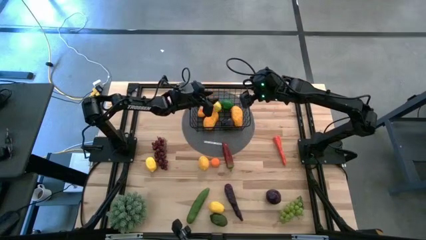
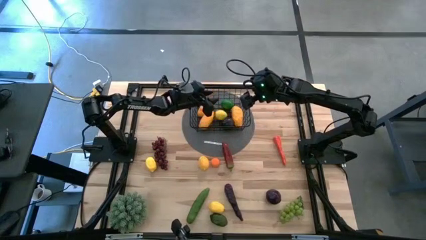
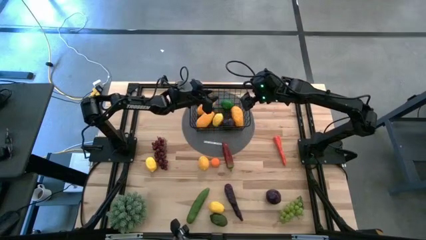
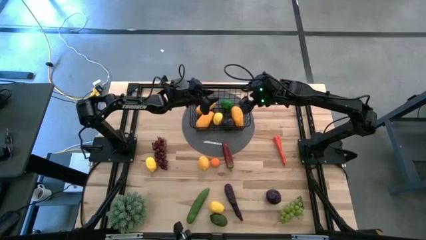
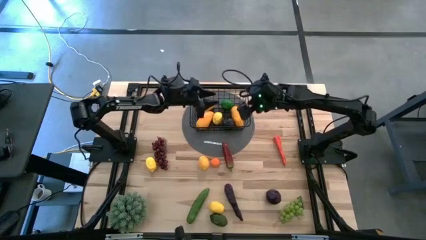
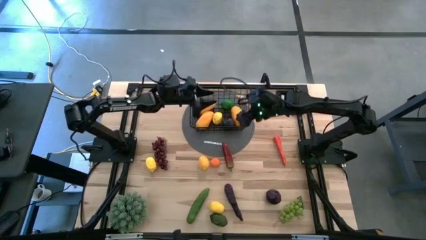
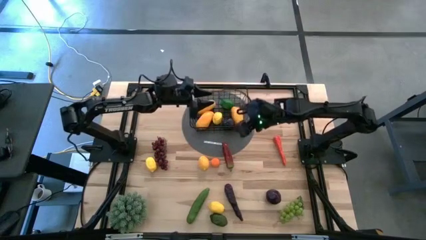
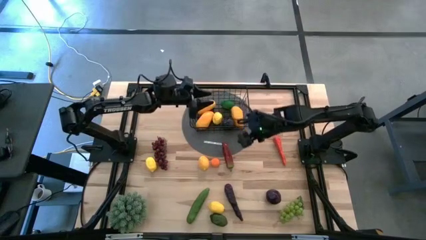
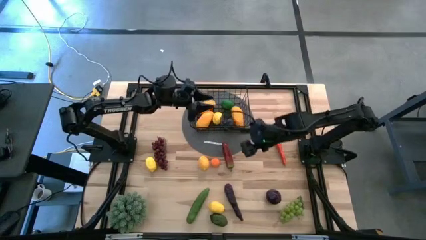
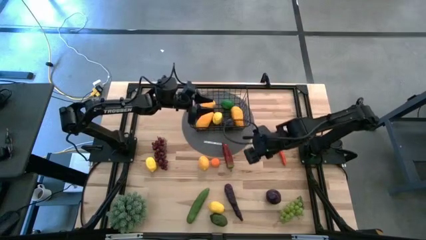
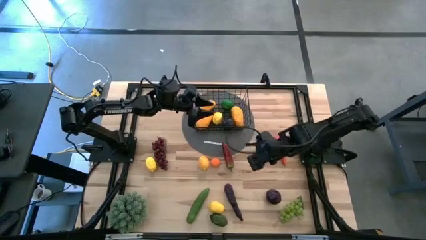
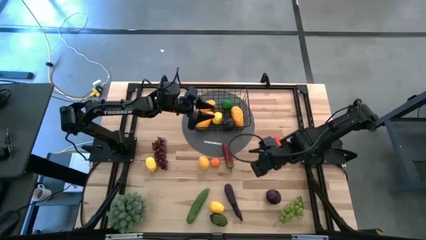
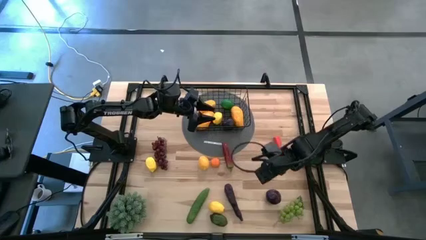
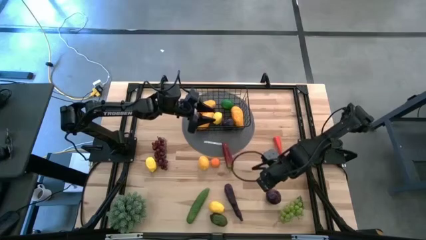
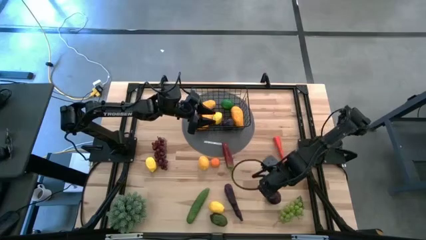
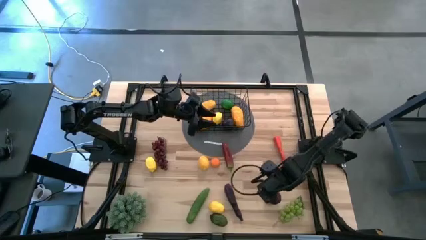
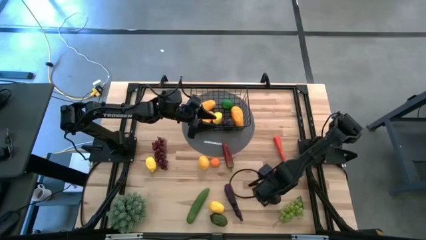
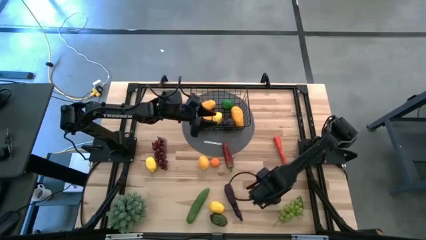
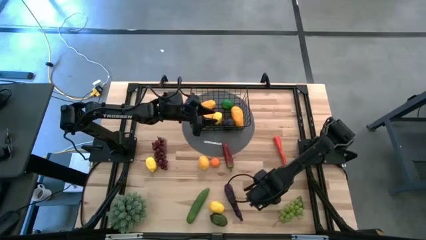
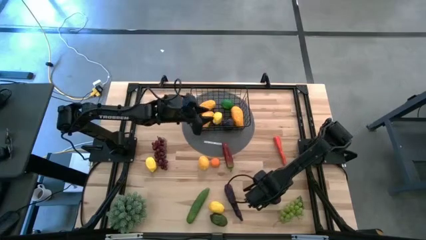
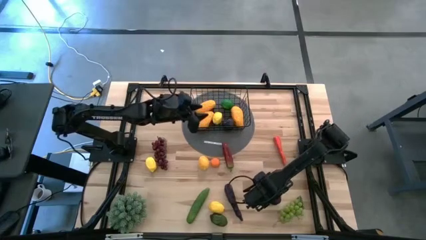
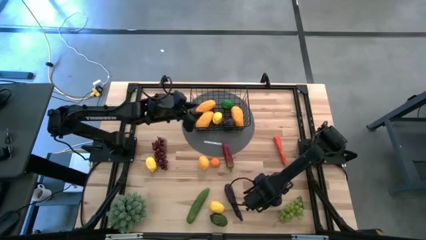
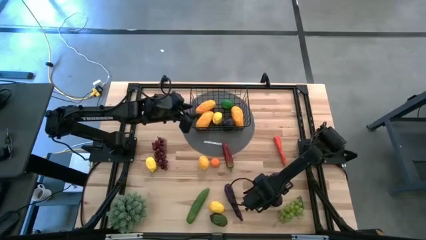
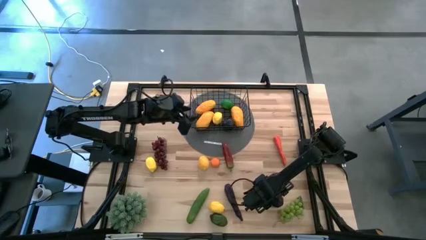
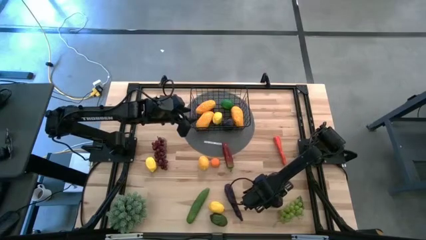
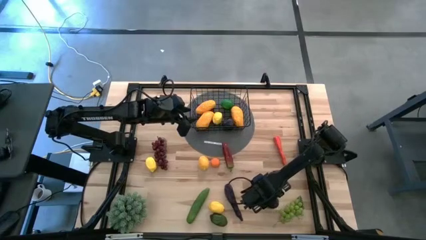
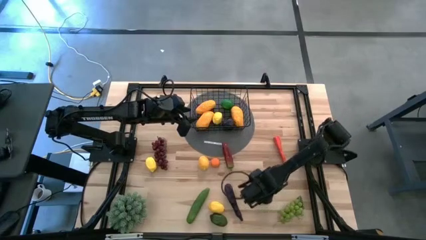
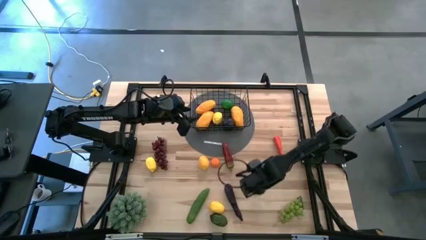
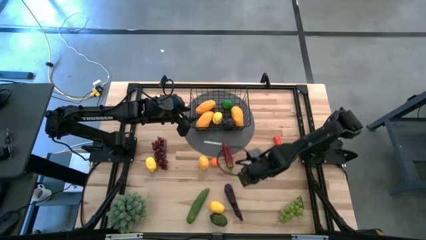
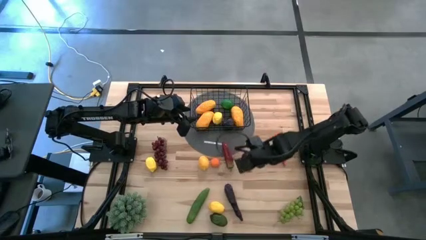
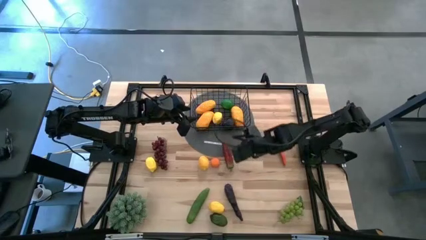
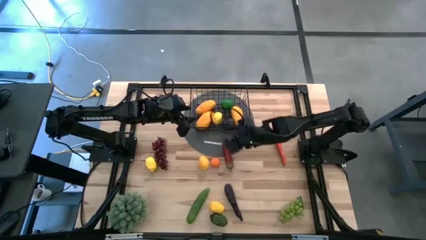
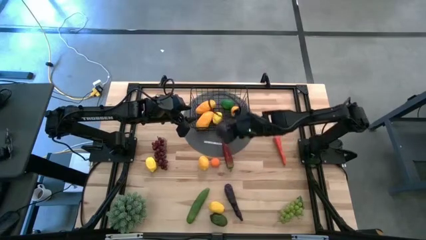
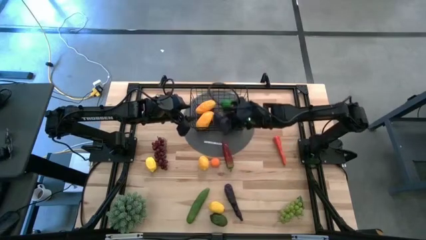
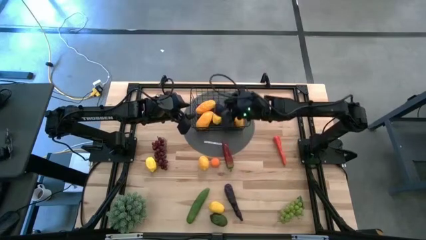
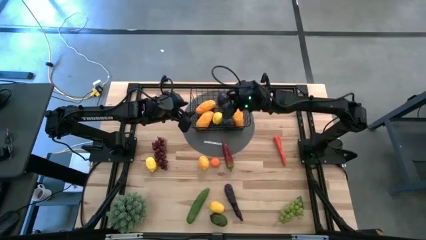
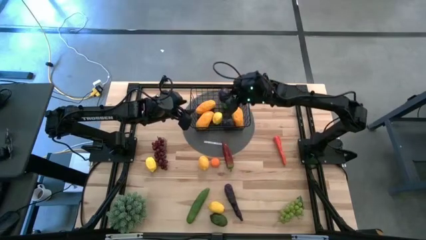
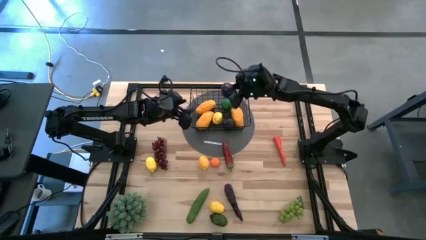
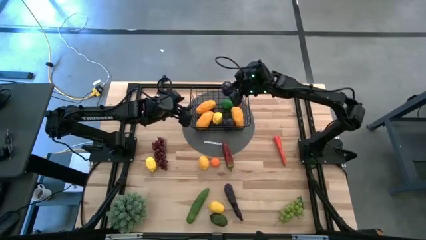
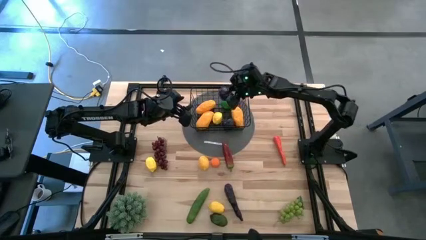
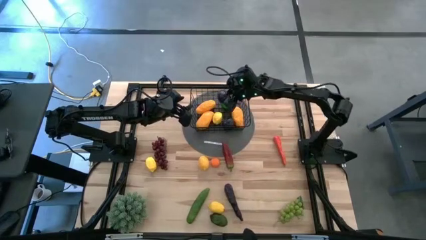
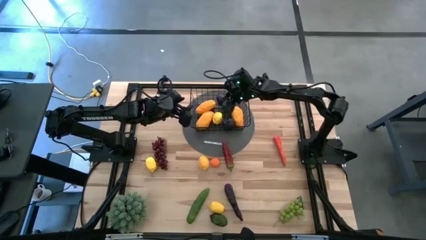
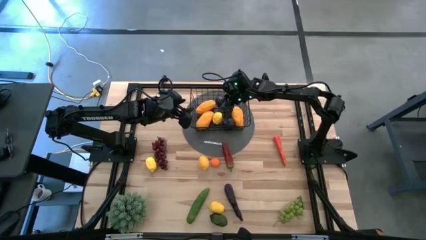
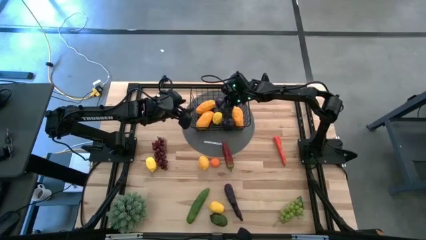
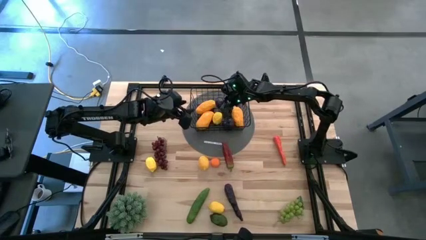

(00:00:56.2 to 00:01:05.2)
Task: Build produce basket
Put the violet plum into the black wire basket

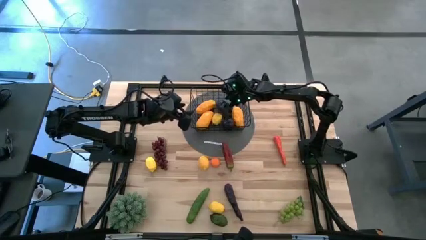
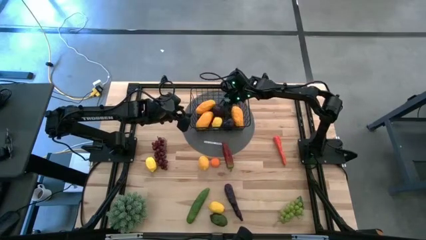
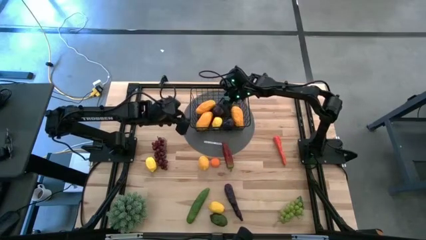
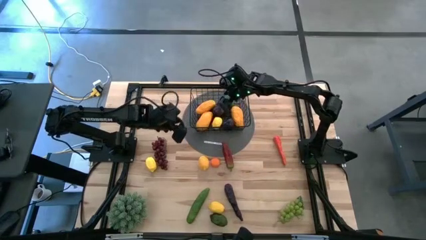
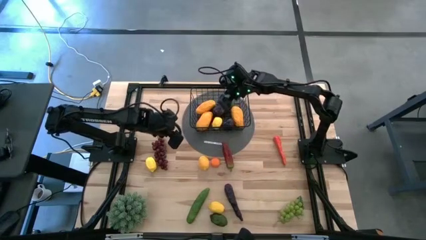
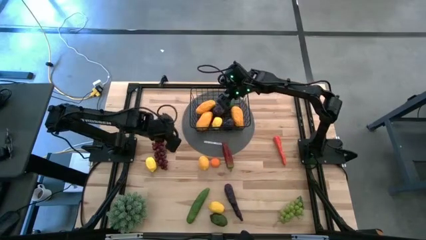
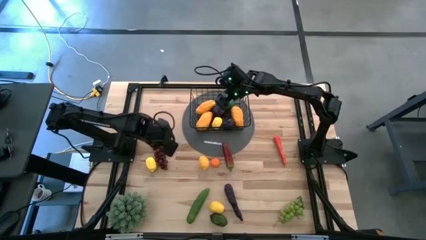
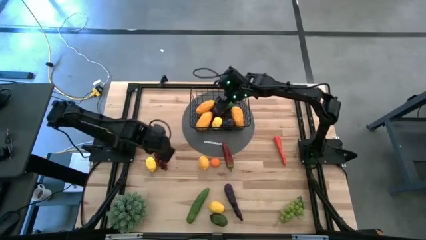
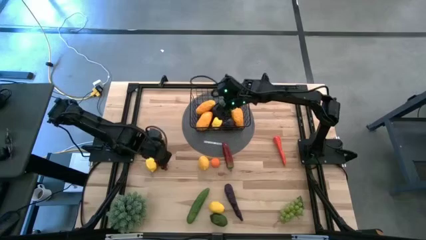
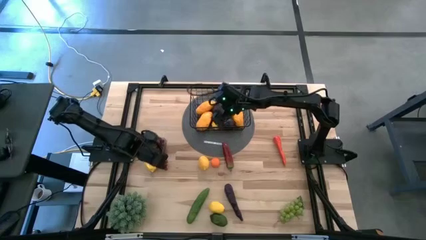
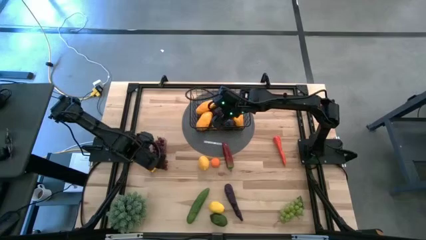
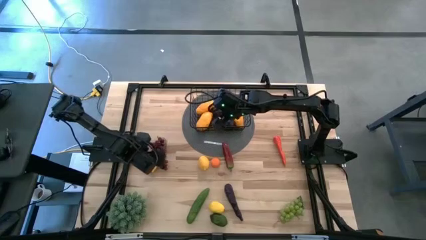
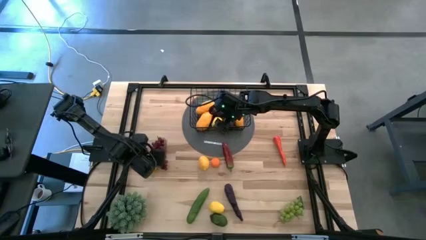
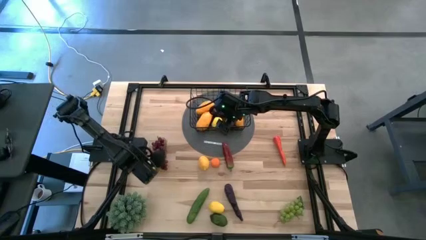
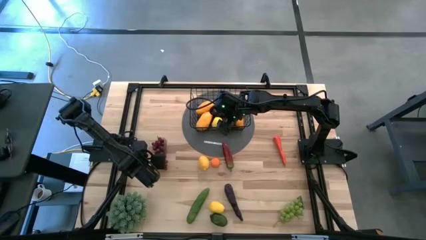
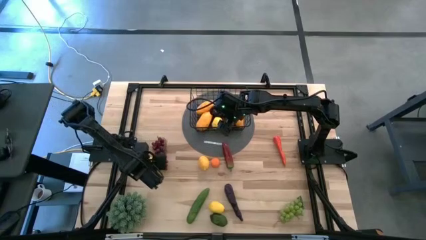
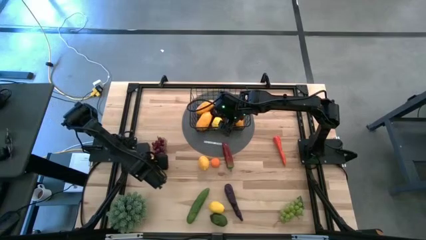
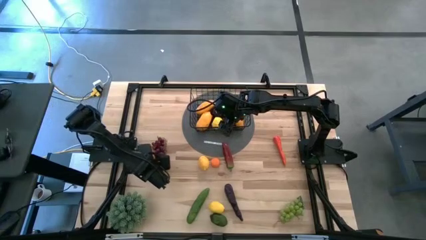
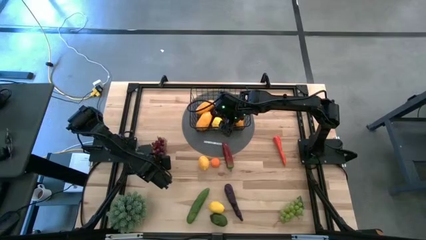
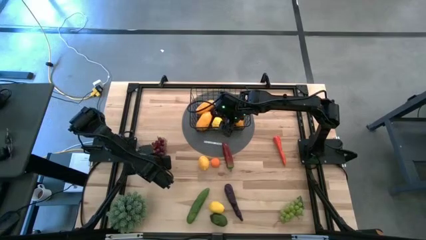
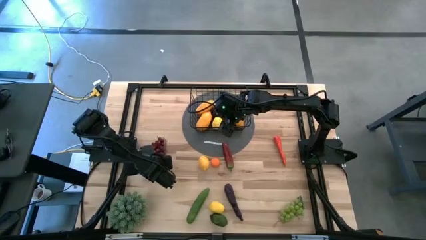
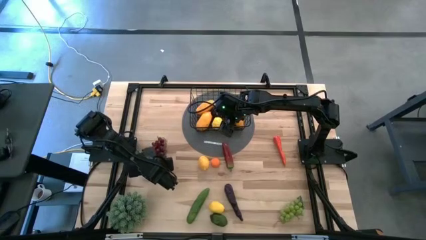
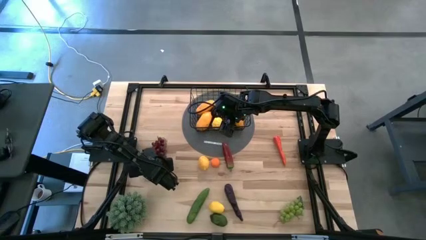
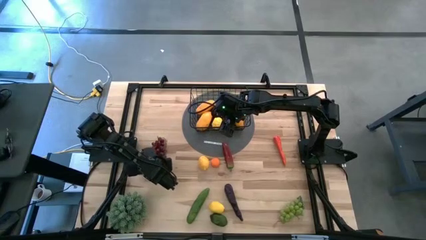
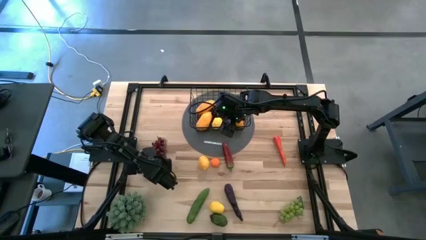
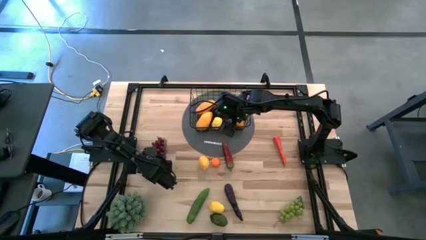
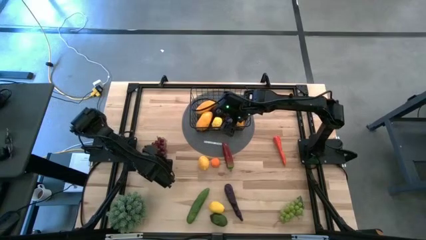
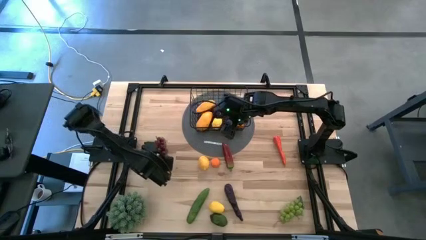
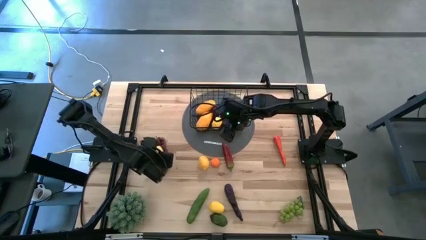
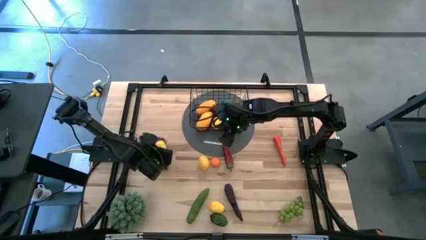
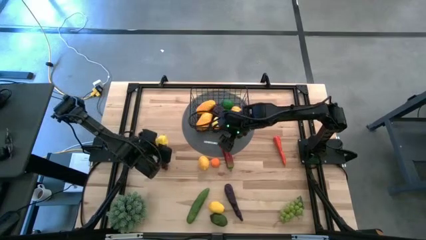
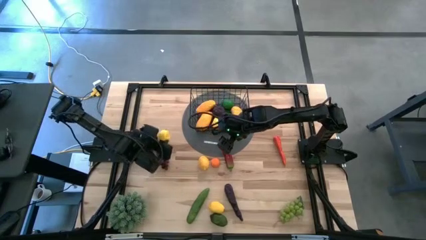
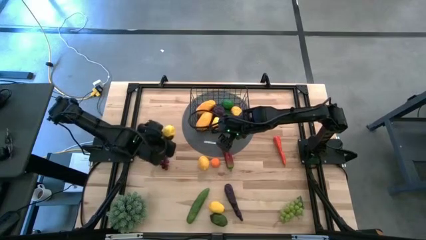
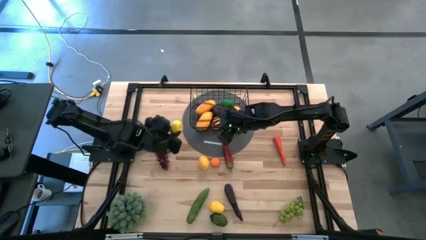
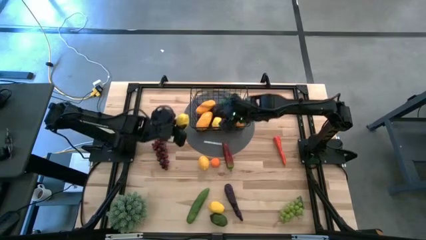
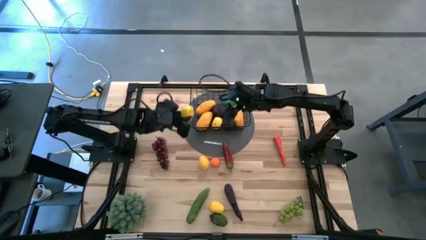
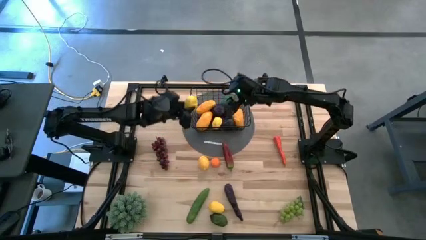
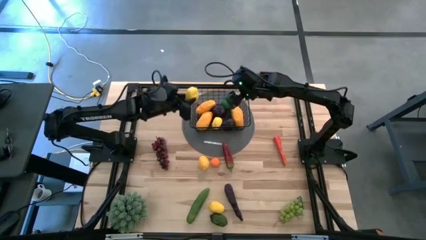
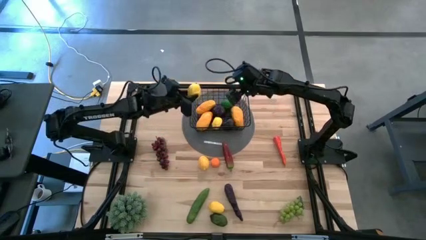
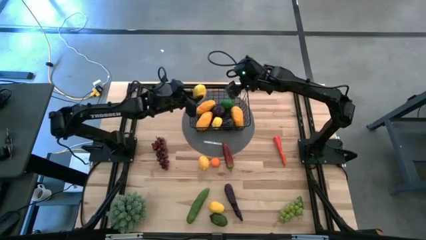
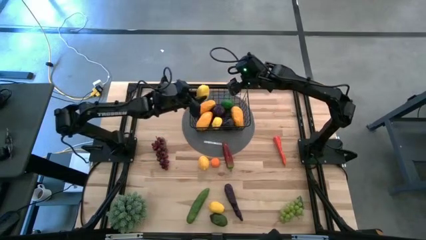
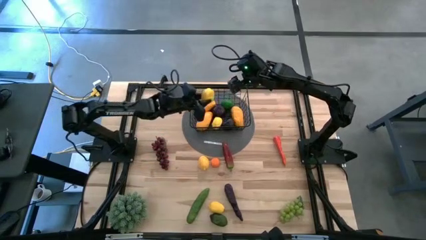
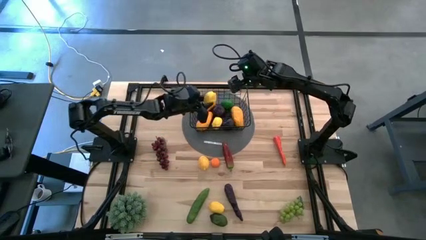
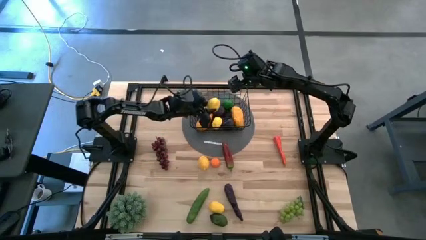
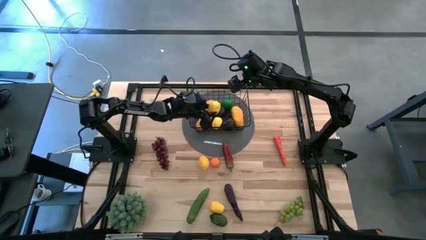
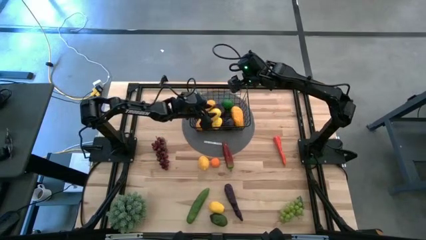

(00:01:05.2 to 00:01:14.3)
Put the yellow lemon into the black wire basket
